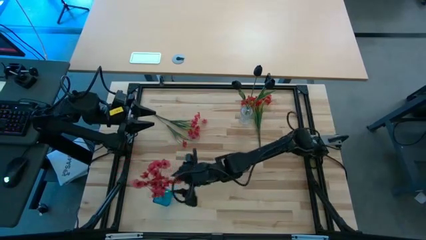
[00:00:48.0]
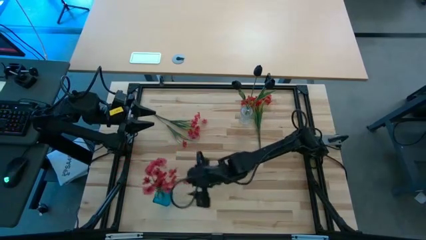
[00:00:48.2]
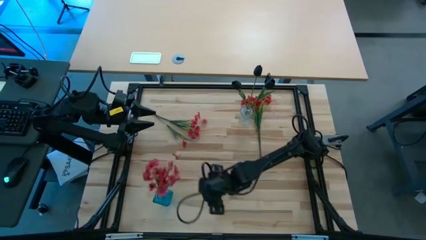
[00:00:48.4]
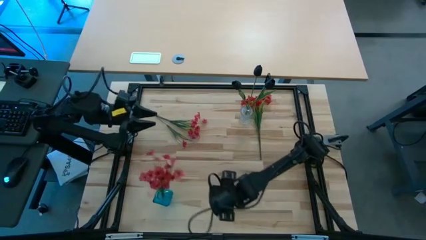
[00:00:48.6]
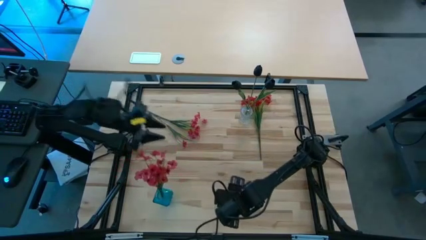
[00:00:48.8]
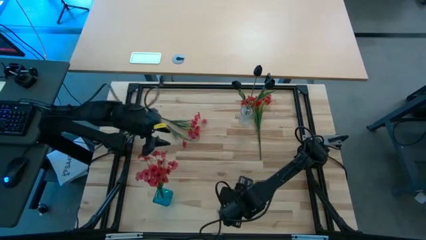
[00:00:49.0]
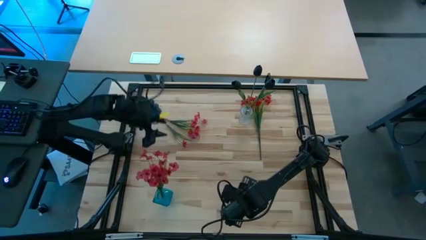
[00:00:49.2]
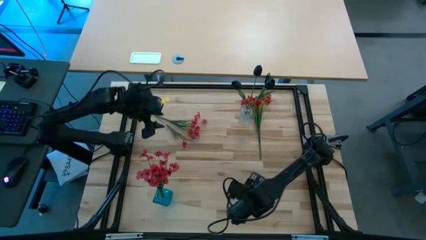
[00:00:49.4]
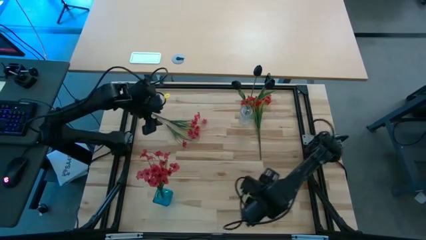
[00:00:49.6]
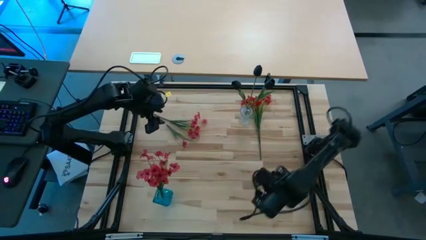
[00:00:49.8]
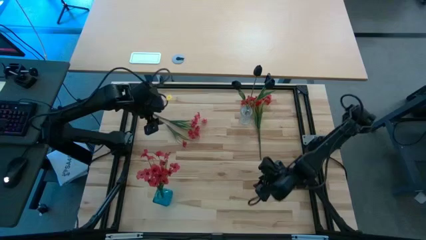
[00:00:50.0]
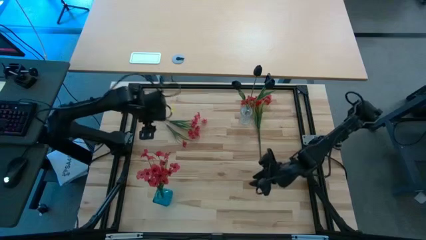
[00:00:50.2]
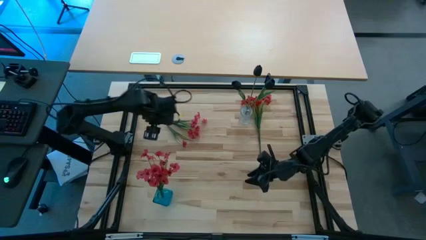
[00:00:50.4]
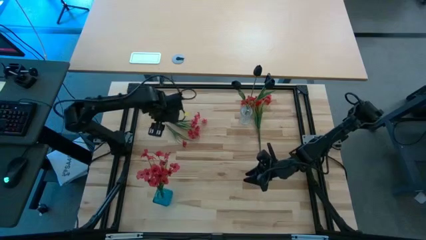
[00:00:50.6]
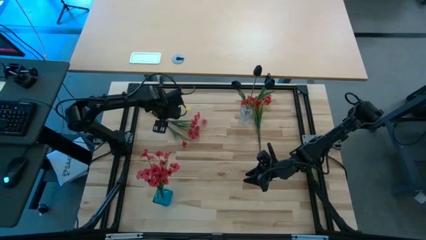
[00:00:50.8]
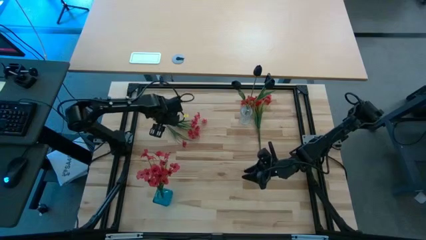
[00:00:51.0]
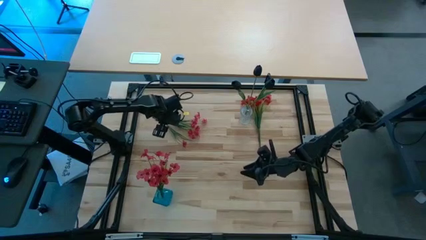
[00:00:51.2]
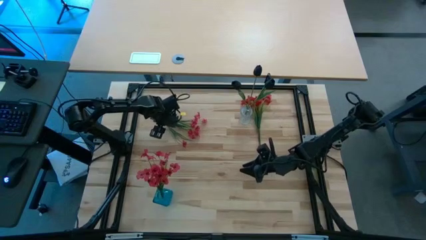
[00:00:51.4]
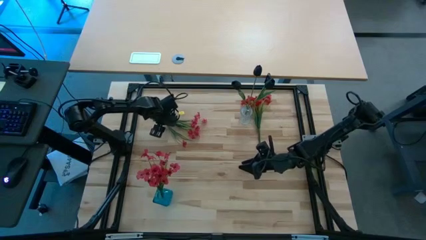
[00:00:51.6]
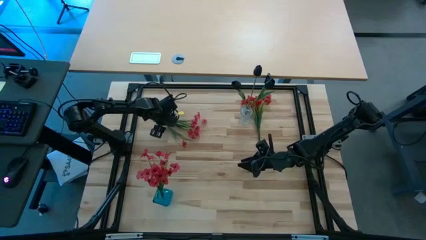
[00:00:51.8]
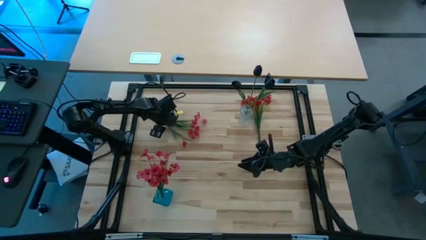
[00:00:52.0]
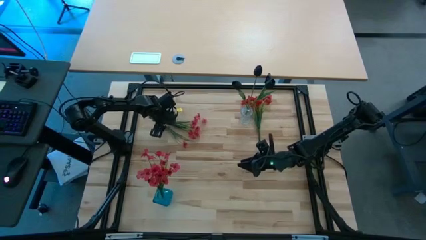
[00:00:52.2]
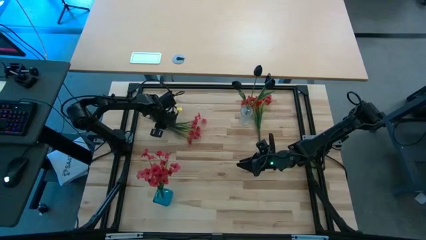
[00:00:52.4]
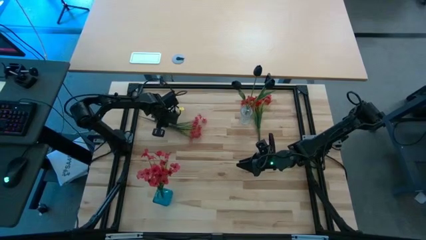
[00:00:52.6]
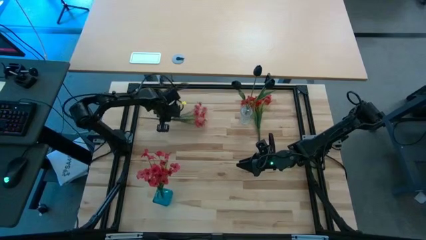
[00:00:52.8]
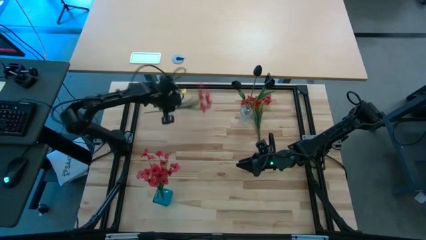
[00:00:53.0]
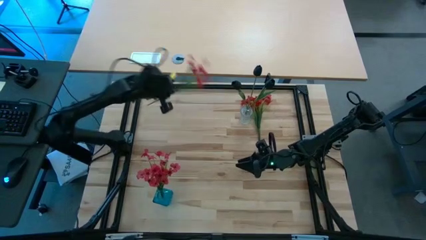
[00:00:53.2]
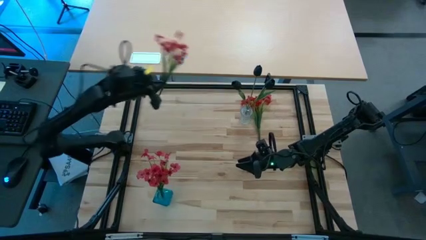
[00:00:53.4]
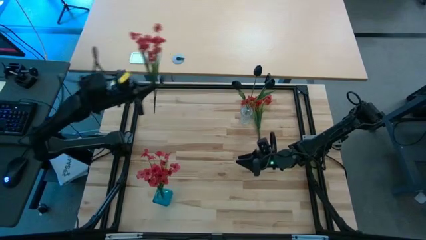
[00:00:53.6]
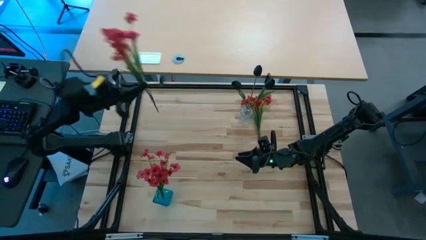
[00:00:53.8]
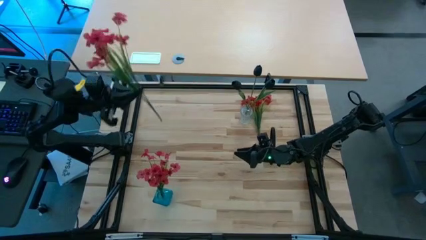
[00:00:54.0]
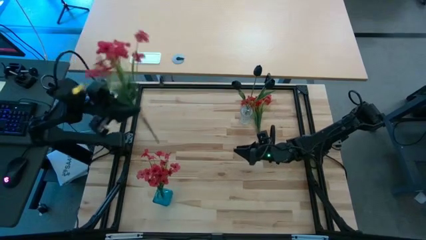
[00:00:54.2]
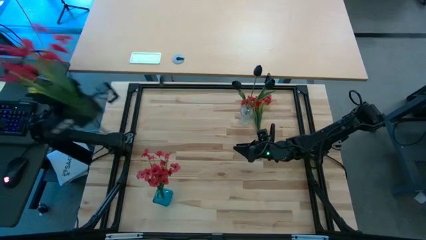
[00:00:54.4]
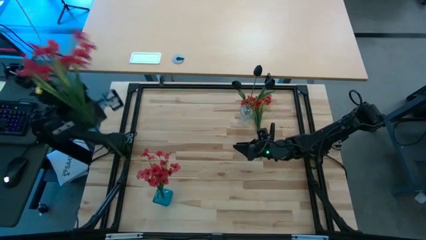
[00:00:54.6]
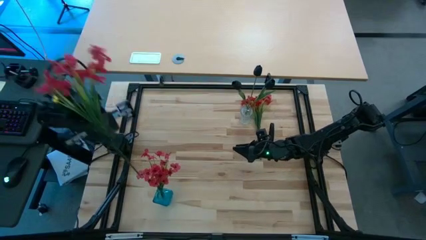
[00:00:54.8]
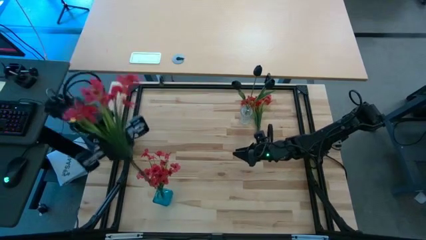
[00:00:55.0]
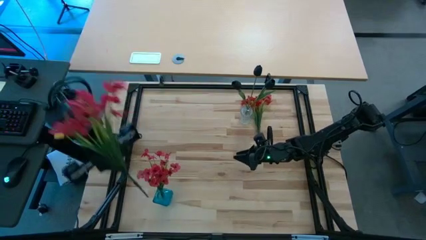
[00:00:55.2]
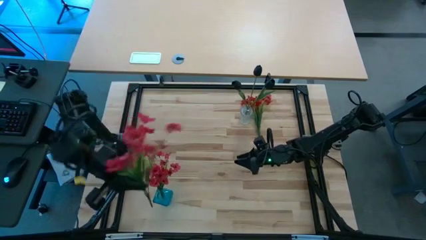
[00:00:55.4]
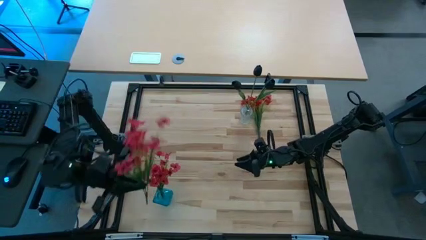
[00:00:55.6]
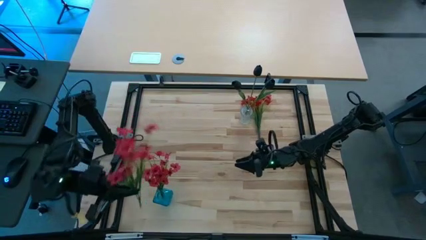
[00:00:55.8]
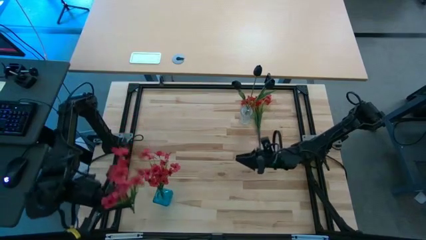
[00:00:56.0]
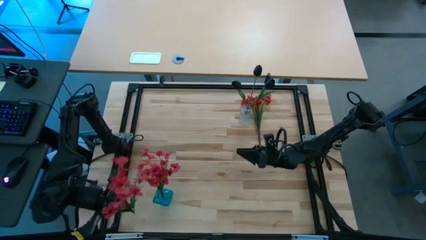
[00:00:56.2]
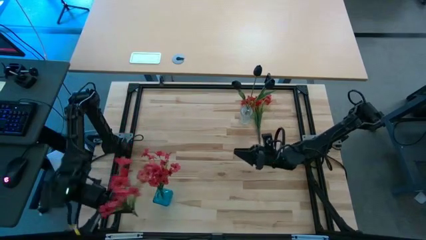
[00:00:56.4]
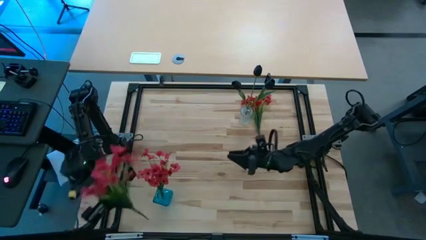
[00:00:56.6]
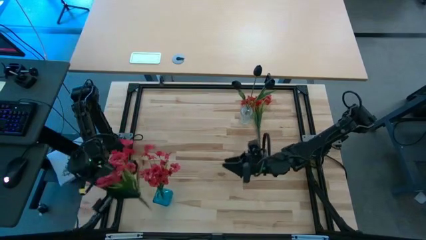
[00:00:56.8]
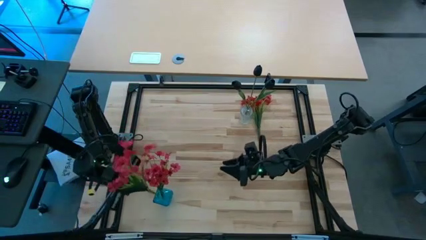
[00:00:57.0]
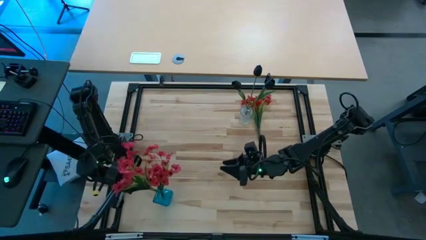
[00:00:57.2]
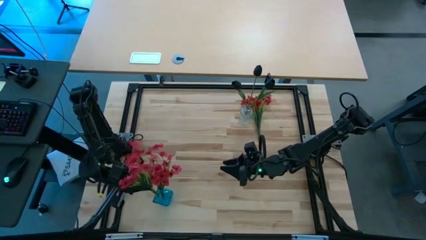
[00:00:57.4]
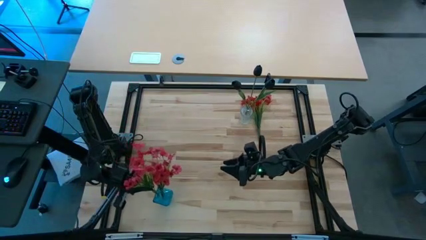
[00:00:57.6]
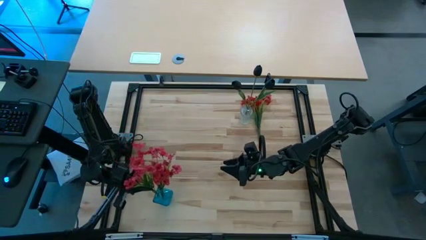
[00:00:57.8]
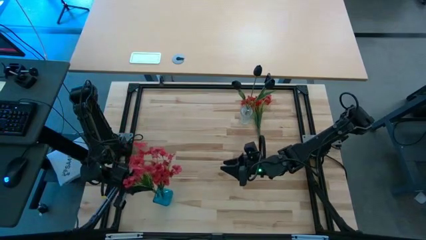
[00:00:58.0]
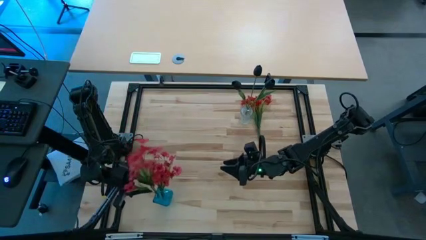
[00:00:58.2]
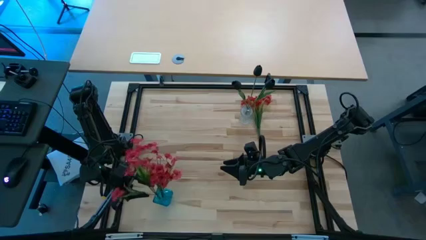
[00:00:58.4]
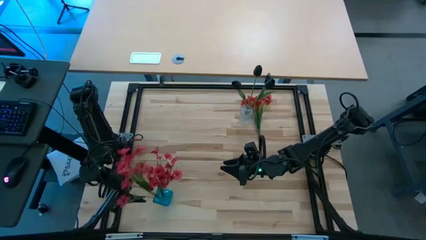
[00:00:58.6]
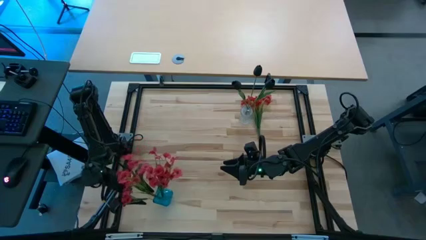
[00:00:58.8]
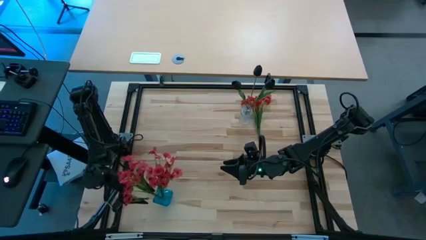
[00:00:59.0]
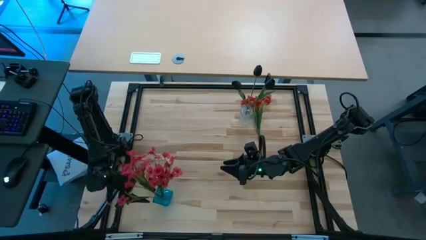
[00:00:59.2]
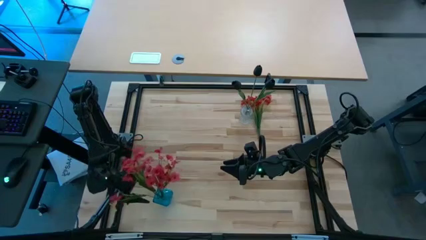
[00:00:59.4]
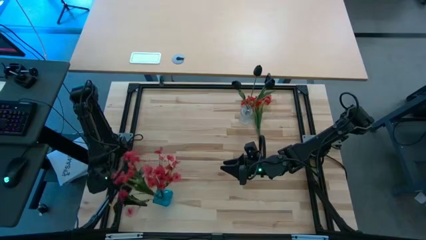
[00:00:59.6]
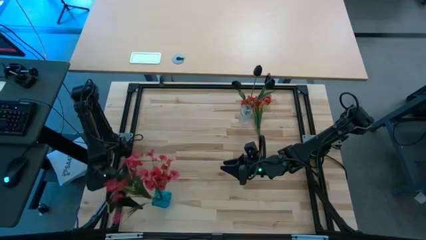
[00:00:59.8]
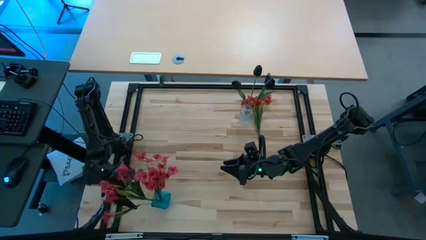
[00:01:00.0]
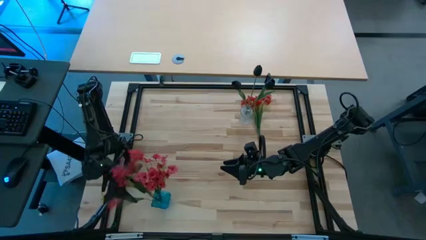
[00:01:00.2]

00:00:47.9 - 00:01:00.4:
Task: Sort flowers into vase by color
Put the left red flowers into the blue vase
